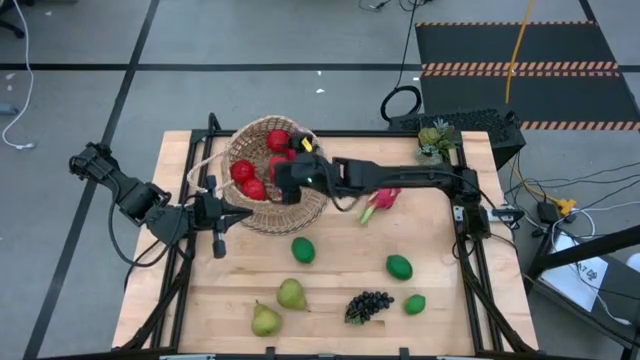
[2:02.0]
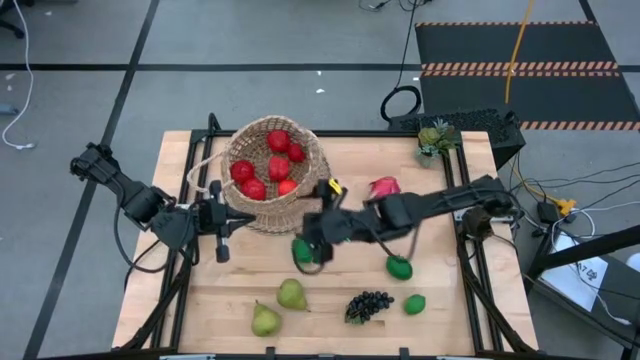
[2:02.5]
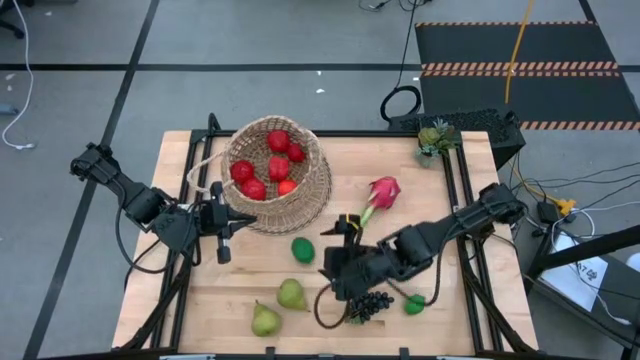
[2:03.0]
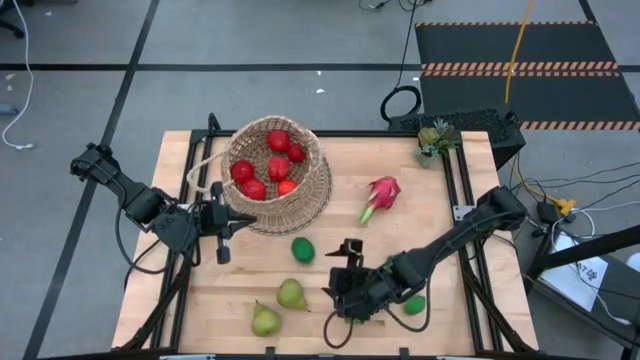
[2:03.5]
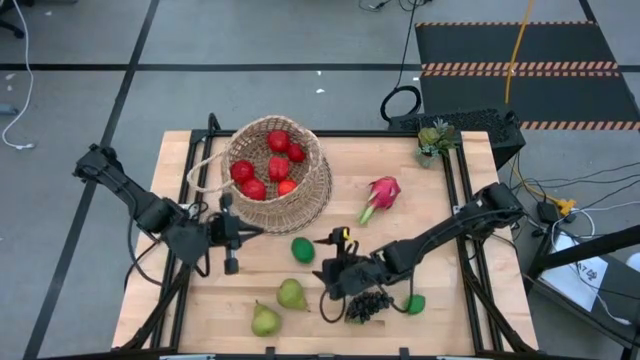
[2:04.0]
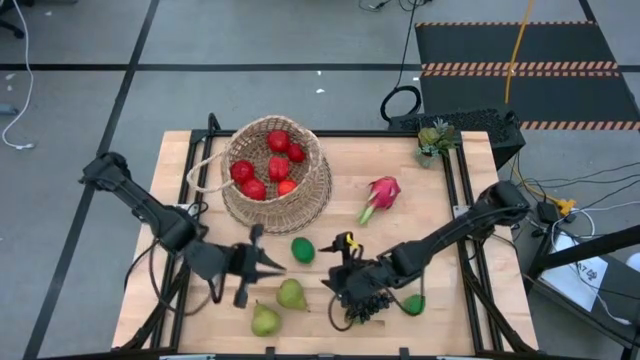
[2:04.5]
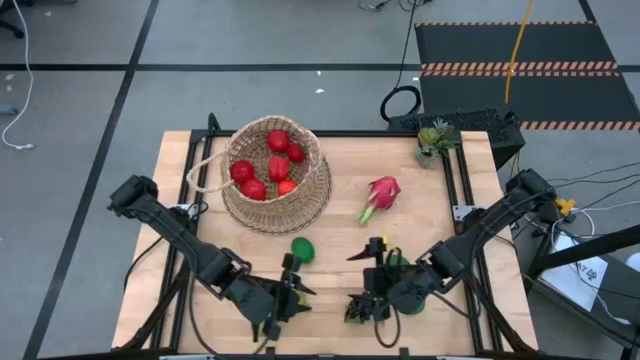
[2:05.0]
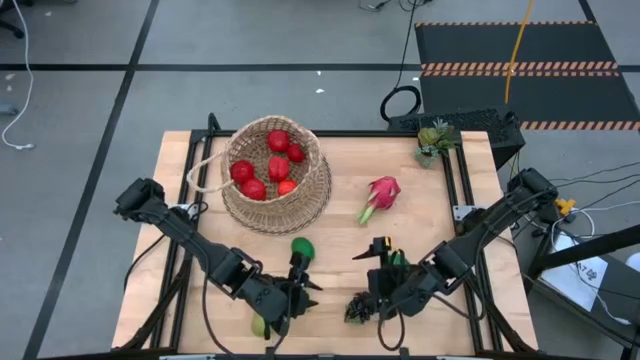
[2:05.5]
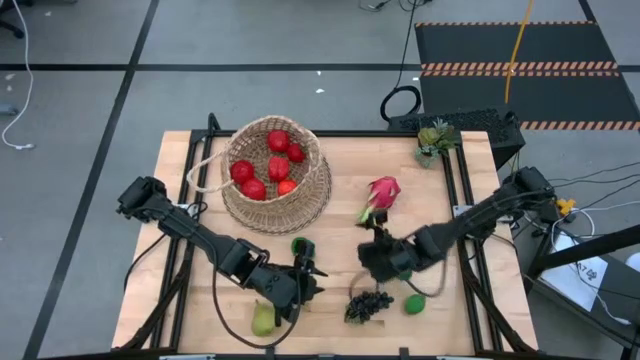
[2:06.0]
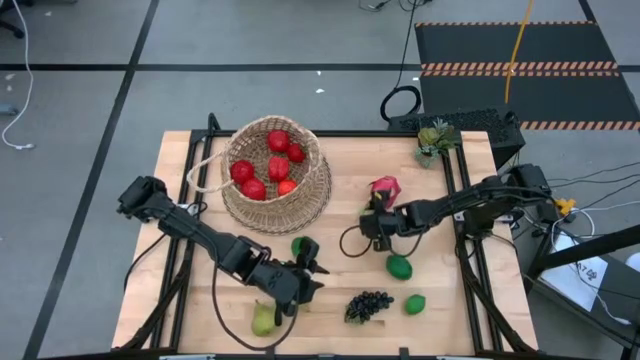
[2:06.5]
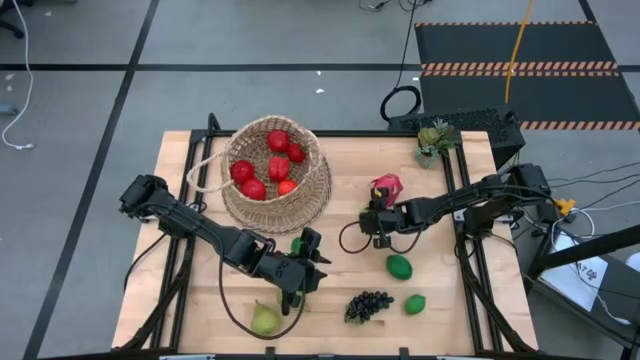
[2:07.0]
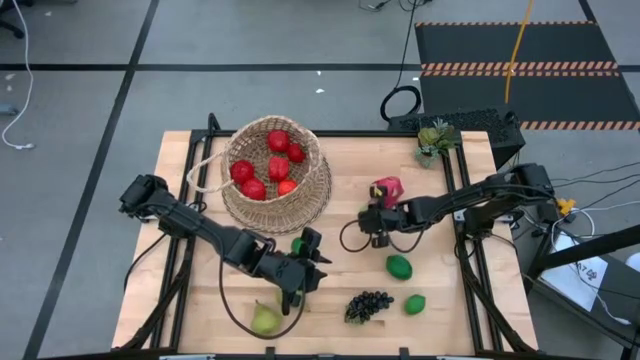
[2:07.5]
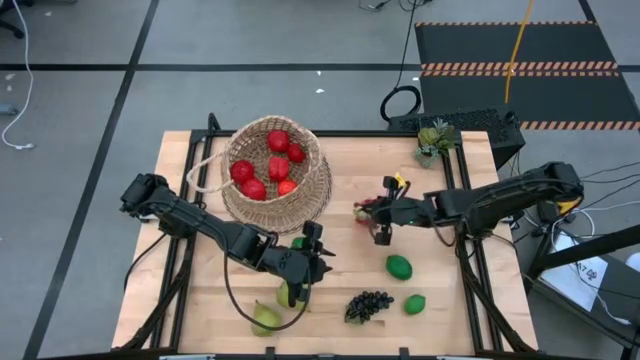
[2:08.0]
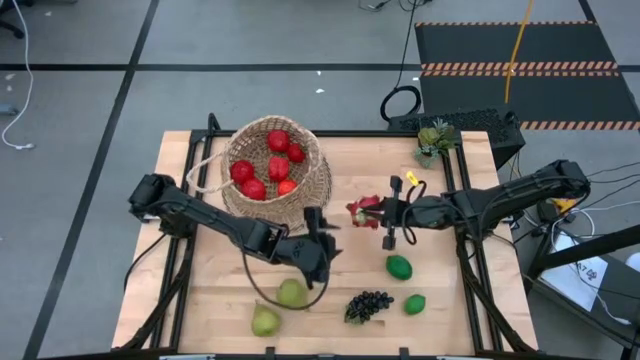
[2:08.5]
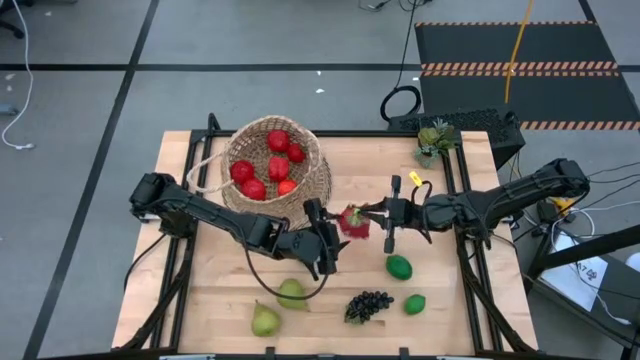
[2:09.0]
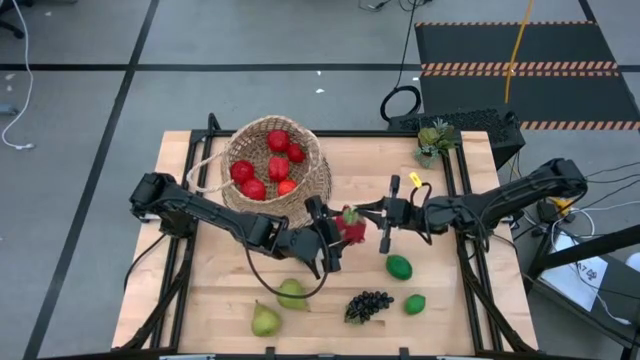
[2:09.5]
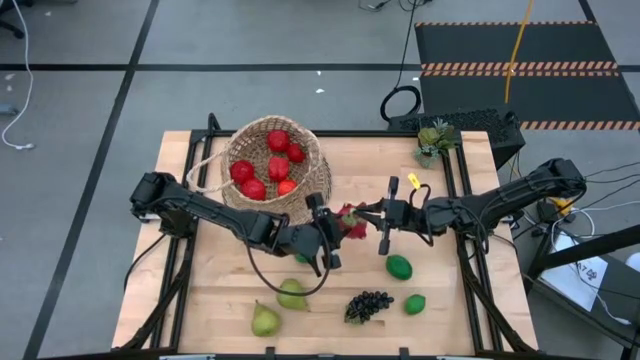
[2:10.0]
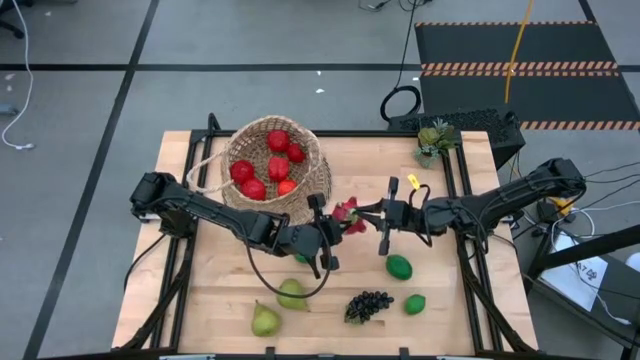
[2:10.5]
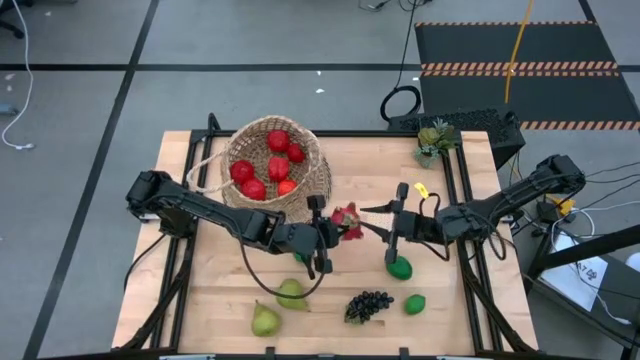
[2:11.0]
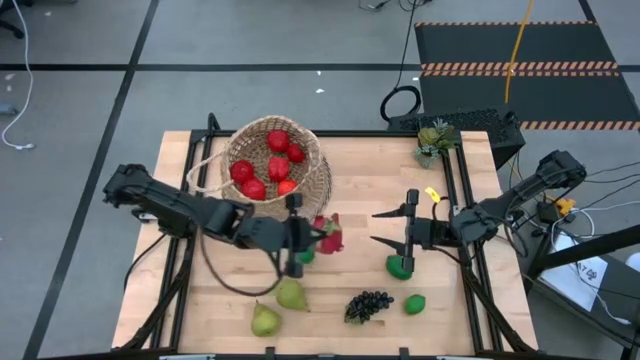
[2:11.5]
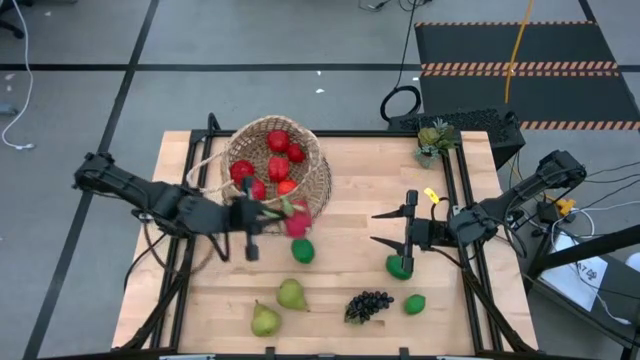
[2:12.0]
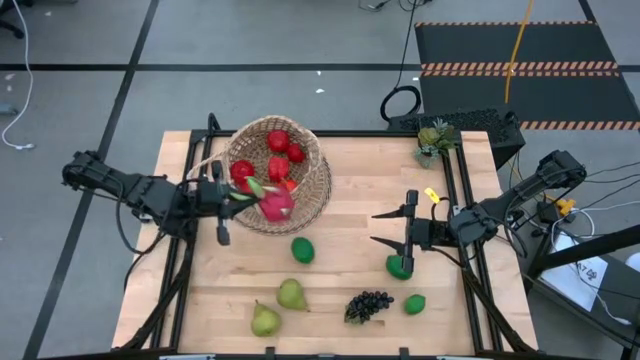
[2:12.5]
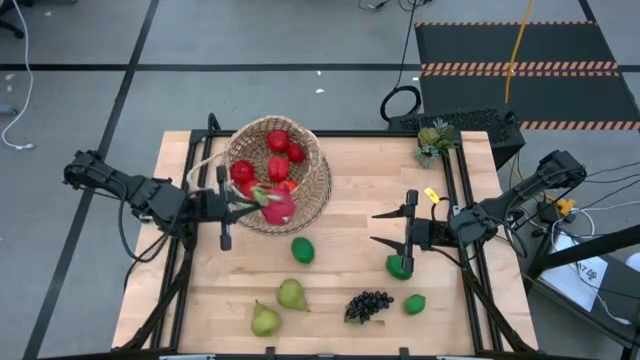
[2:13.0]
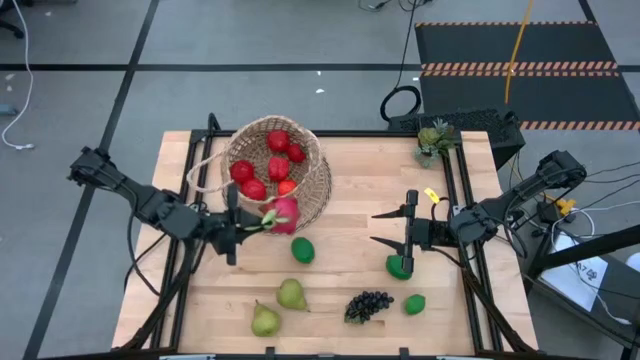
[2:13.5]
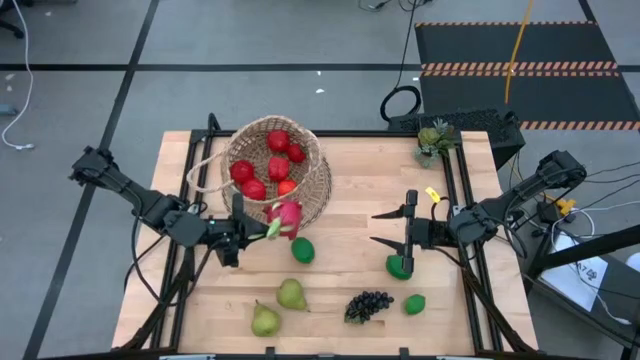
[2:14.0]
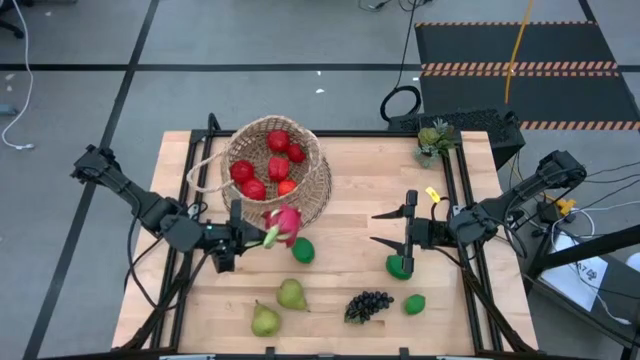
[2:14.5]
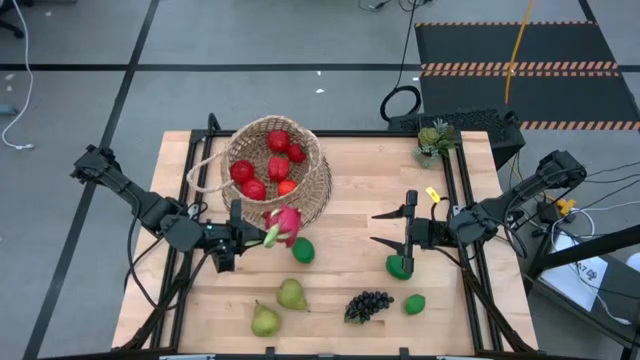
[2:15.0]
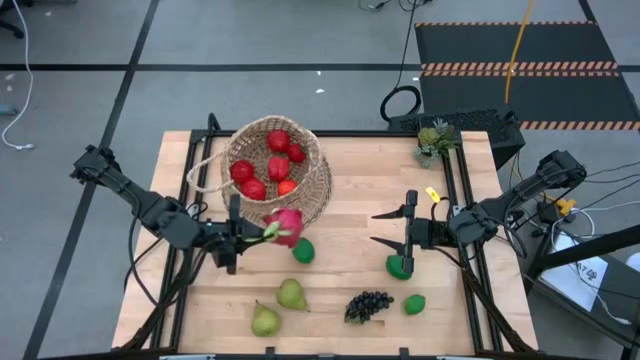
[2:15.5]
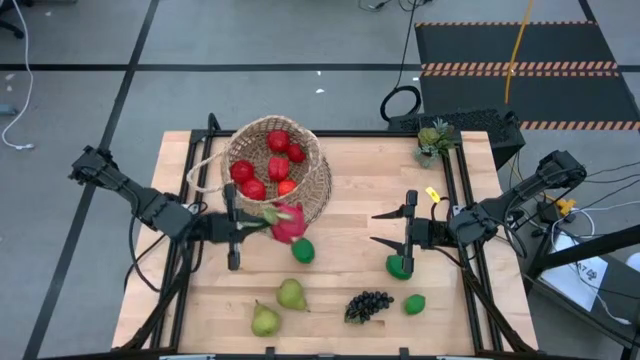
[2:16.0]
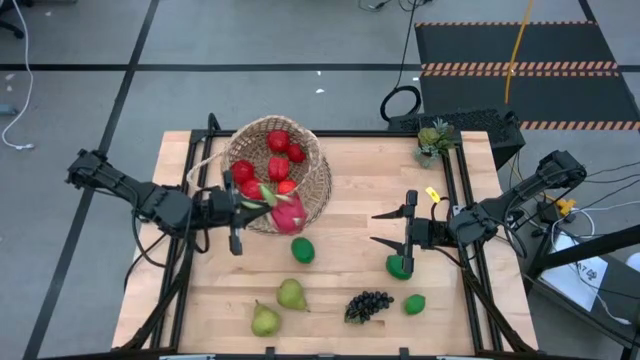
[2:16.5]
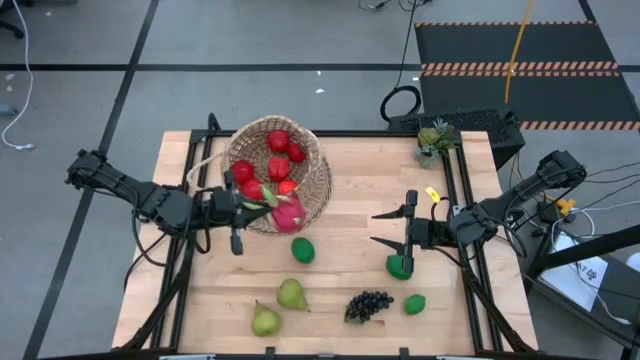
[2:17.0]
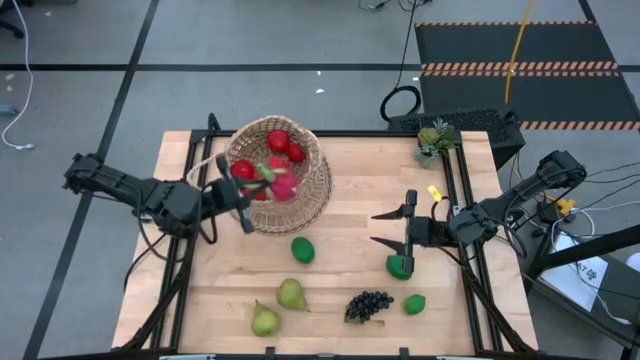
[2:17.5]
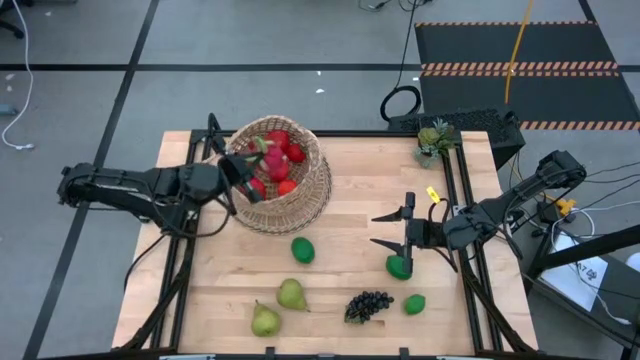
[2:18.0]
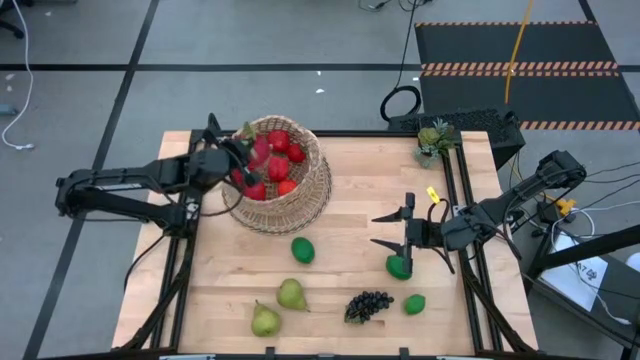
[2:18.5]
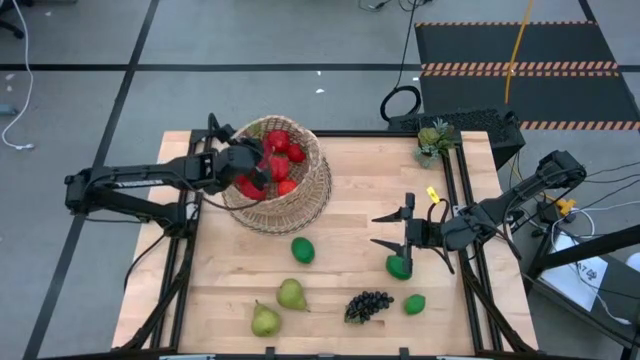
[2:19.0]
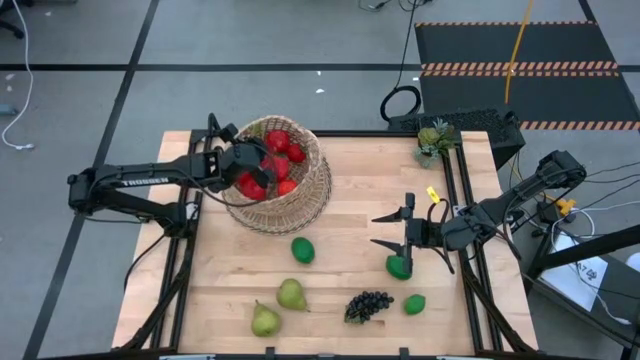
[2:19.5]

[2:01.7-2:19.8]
Task: Build produce basket
Put the dragon fruit into the basket

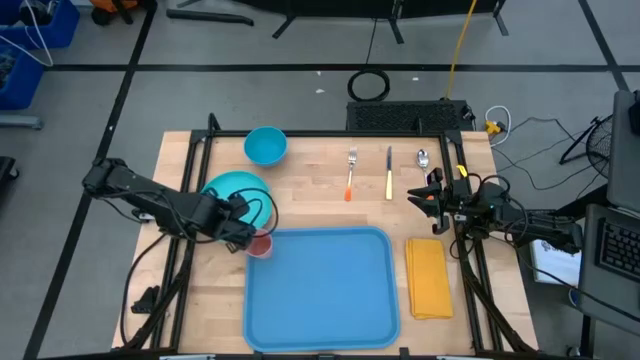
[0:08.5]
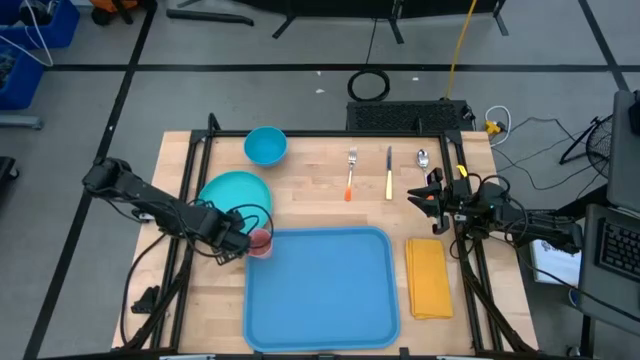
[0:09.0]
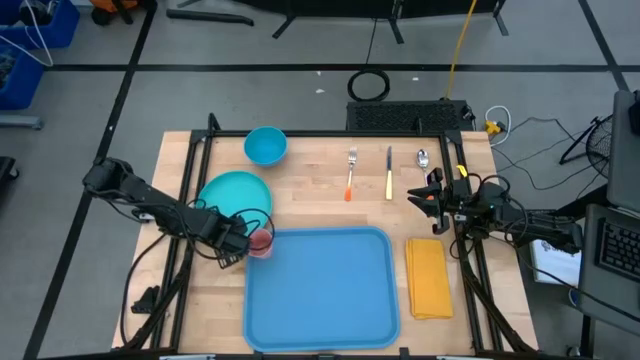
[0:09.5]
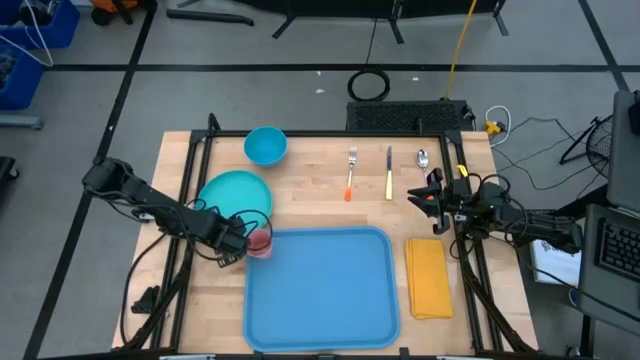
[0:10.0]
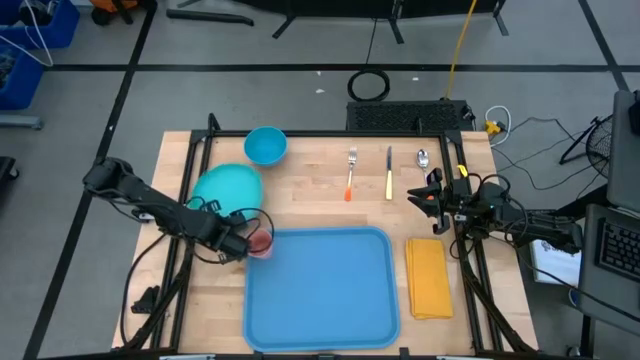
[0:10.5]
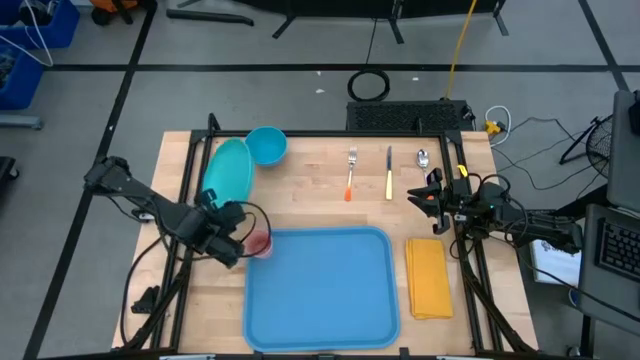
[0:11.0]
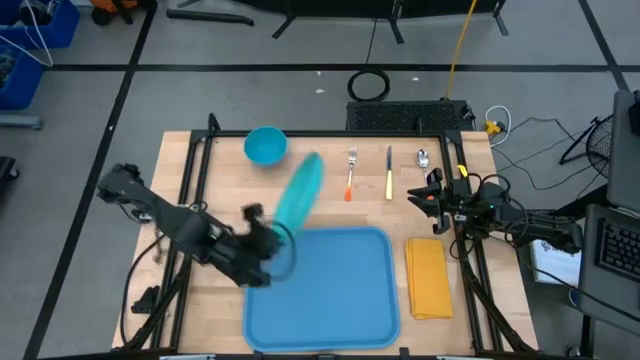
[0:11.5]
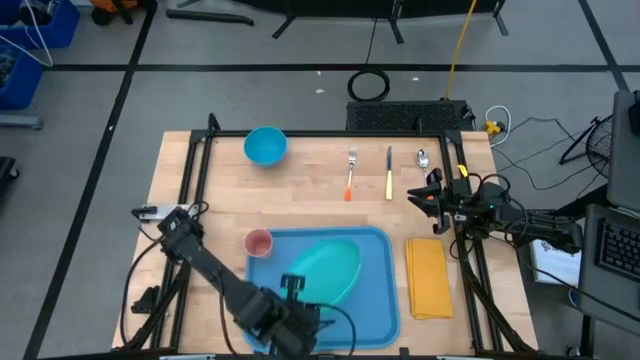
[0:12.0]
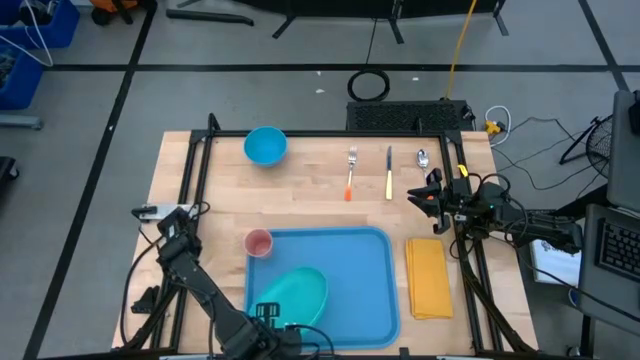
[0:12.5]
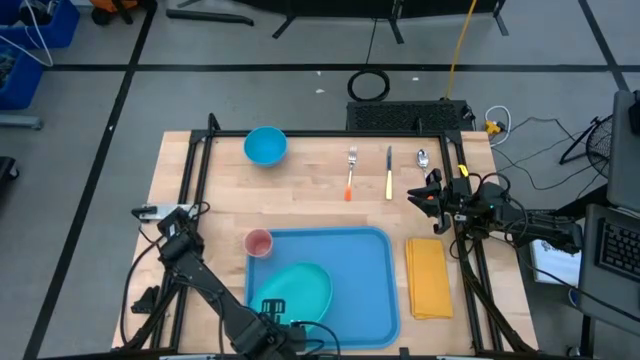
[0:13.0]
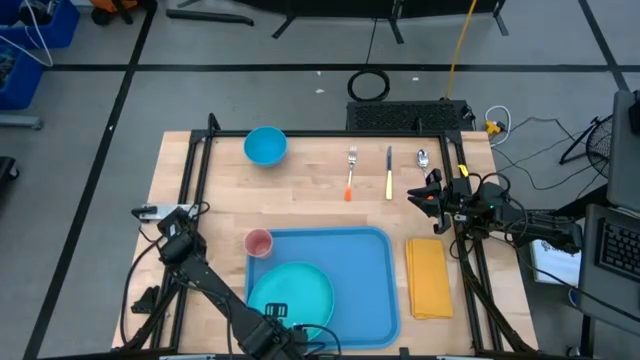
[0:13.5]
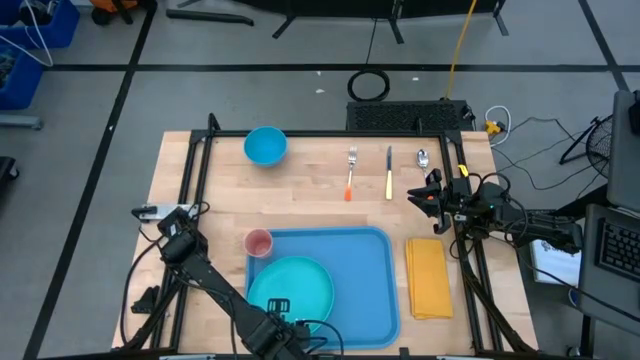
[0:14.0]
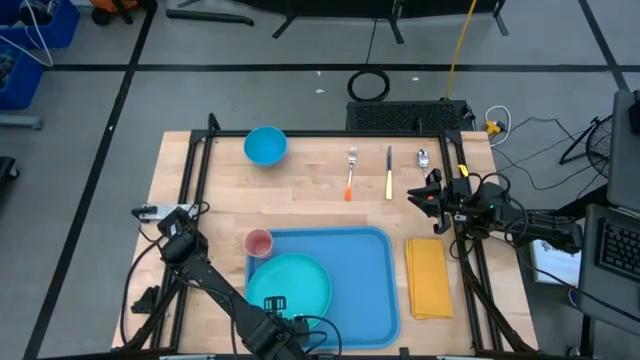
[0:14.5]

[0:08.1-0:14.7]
Task: Set up tray
Put the green plate on the blue tray
